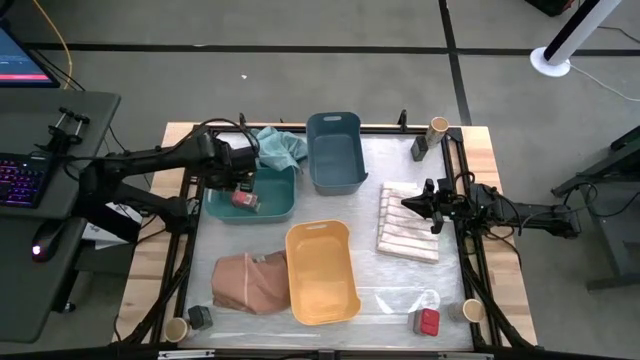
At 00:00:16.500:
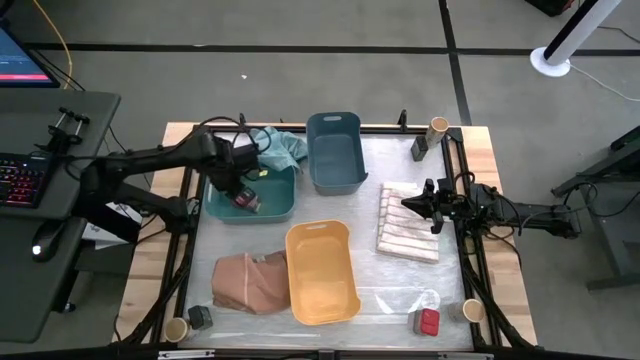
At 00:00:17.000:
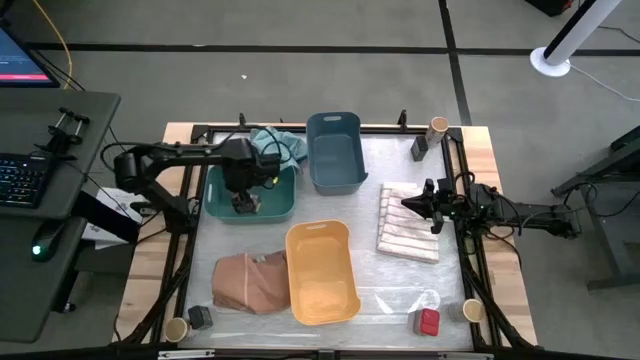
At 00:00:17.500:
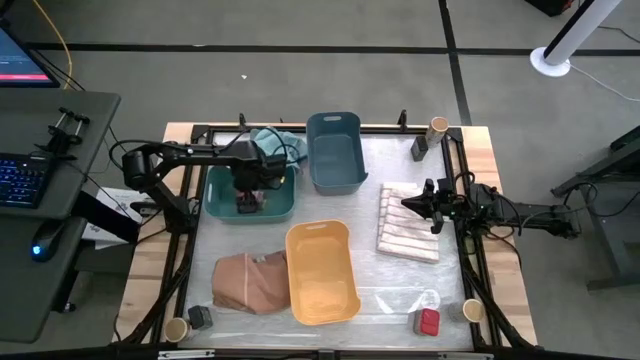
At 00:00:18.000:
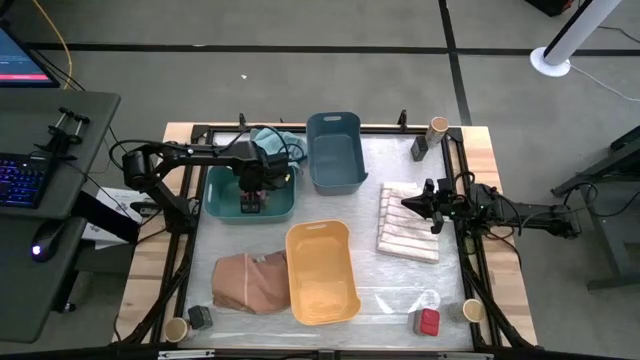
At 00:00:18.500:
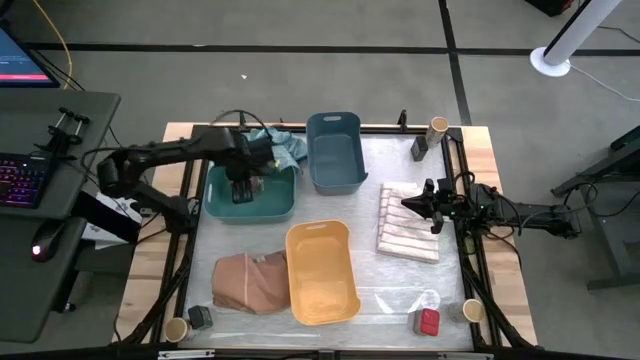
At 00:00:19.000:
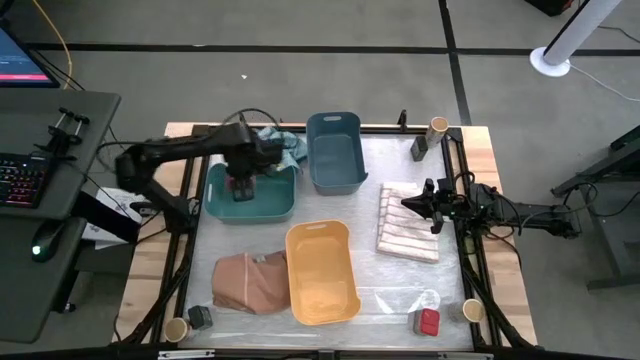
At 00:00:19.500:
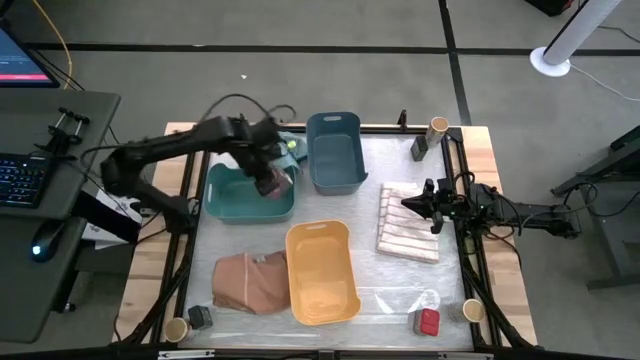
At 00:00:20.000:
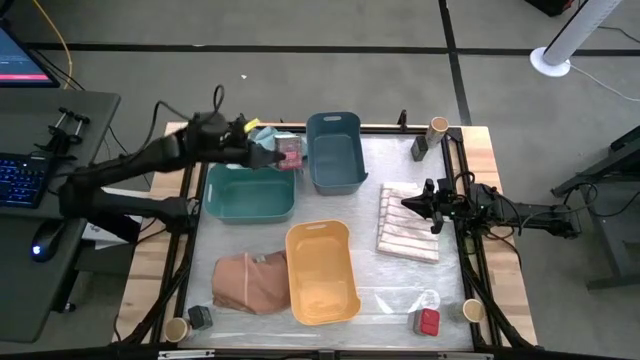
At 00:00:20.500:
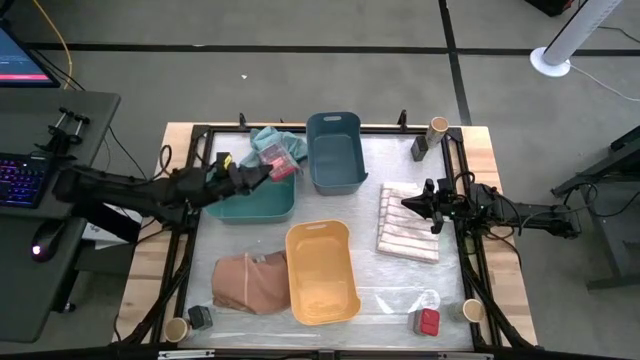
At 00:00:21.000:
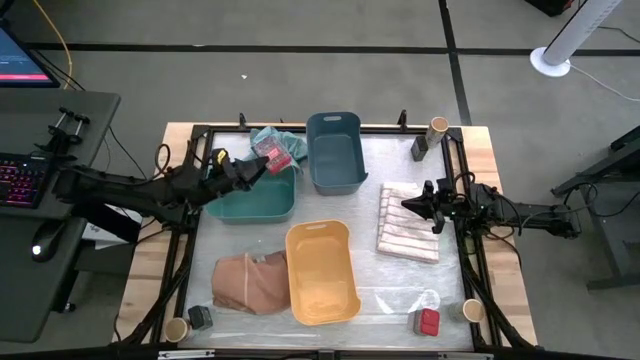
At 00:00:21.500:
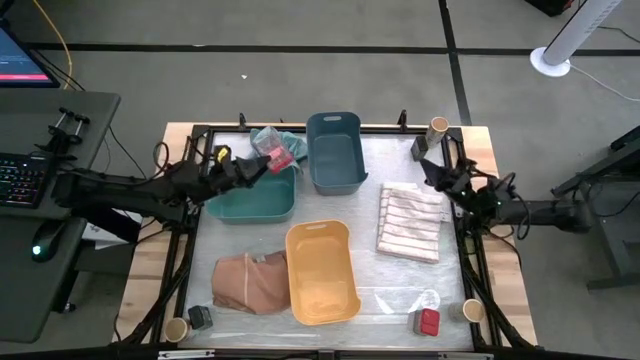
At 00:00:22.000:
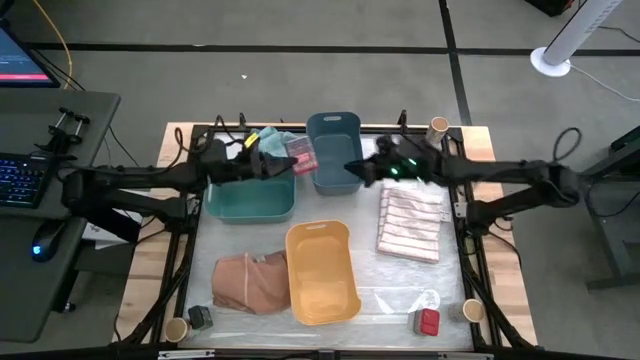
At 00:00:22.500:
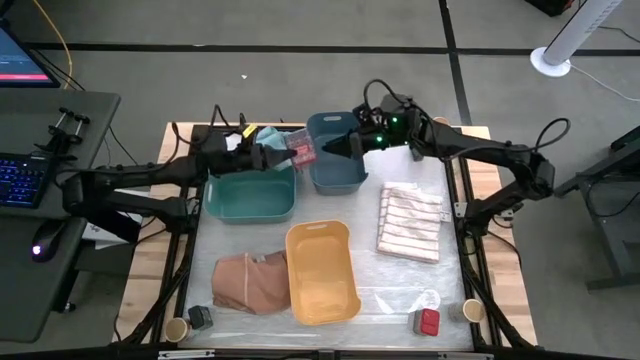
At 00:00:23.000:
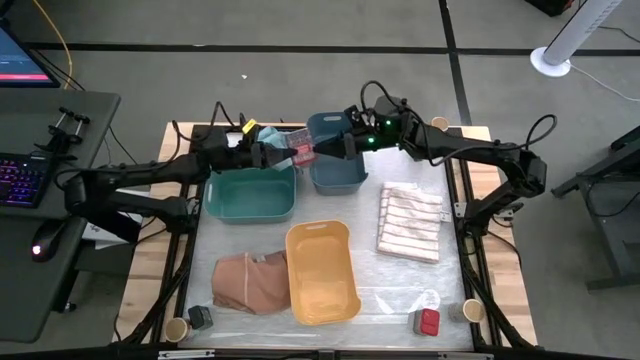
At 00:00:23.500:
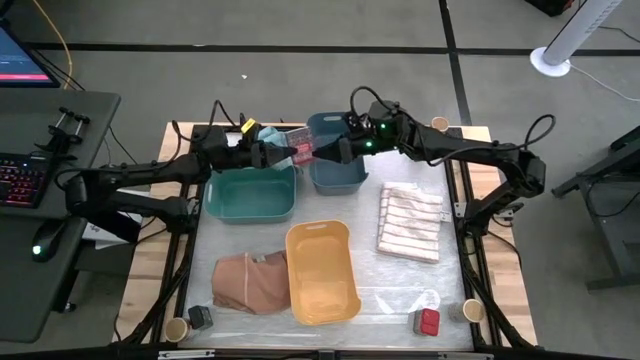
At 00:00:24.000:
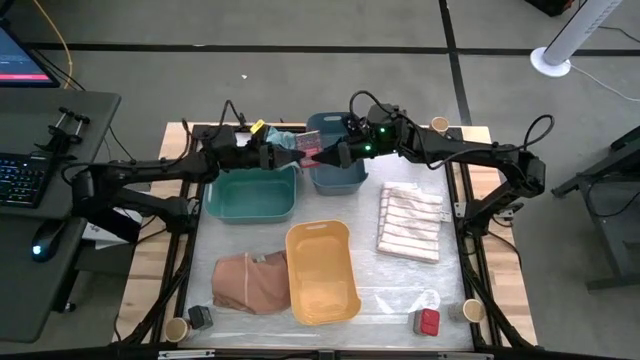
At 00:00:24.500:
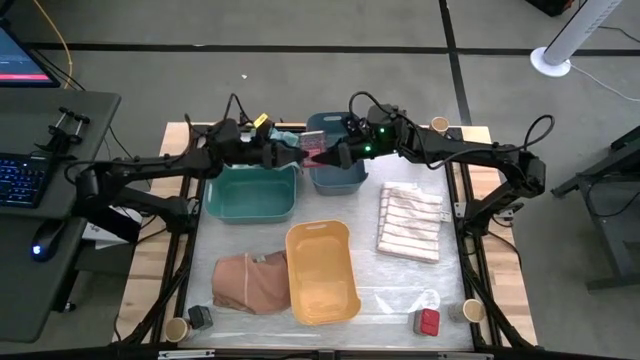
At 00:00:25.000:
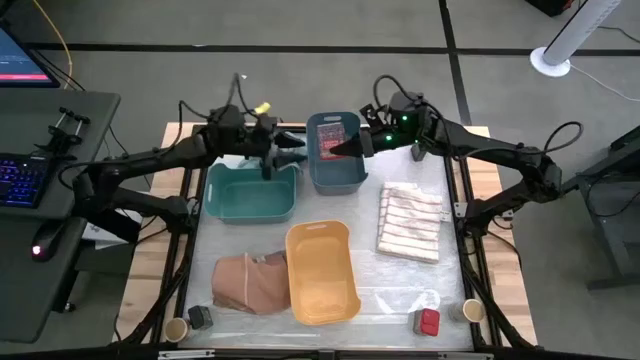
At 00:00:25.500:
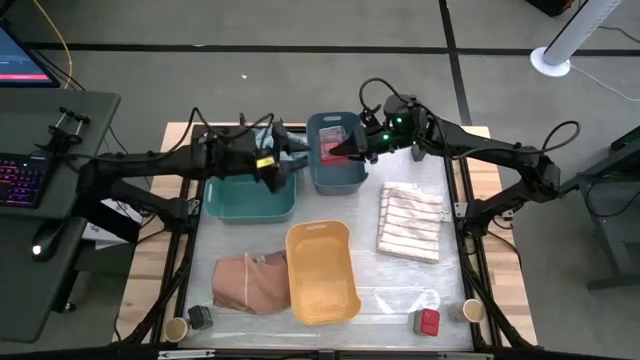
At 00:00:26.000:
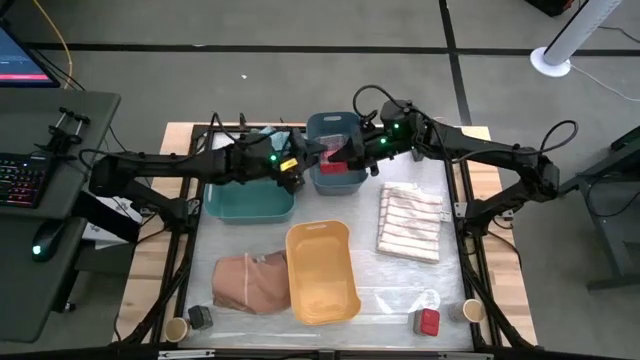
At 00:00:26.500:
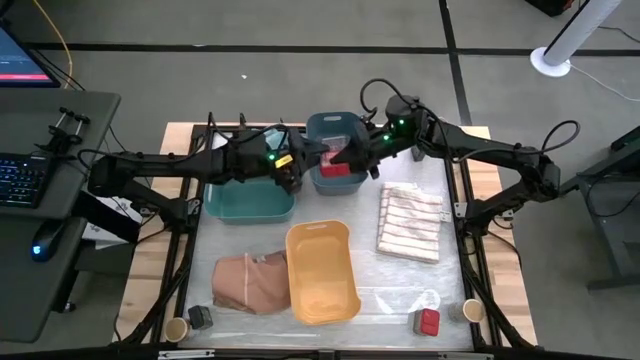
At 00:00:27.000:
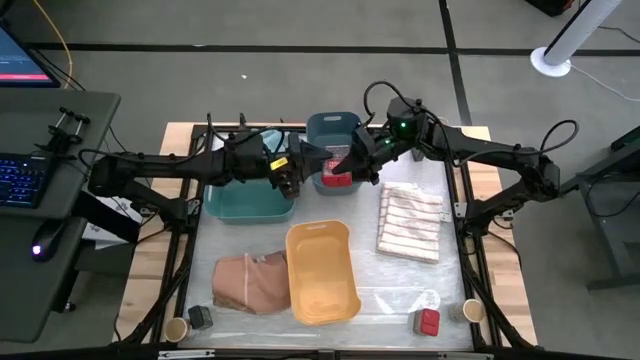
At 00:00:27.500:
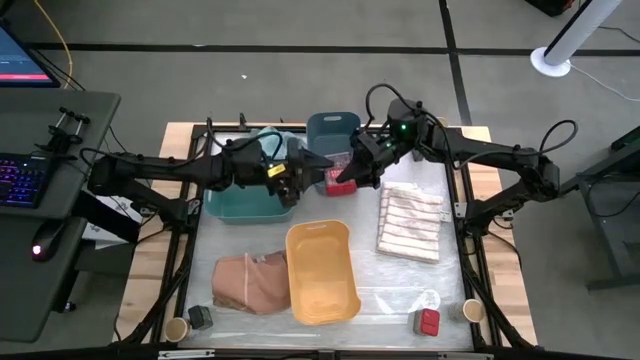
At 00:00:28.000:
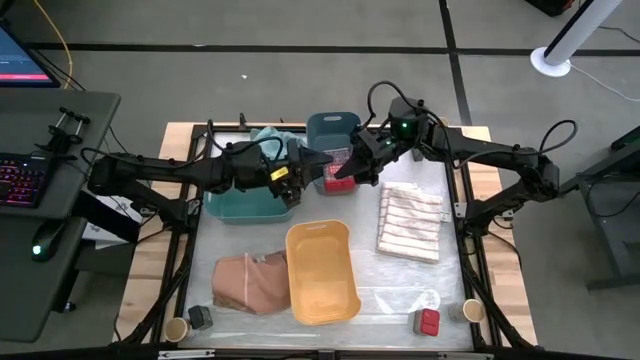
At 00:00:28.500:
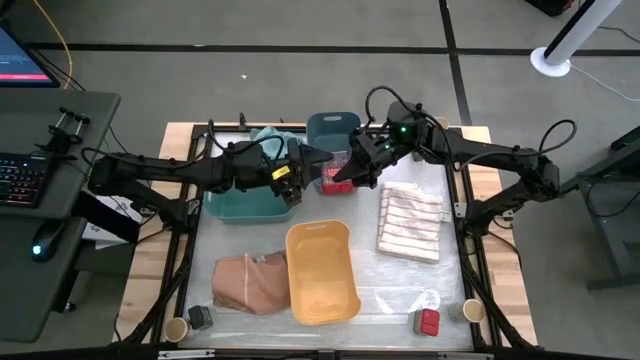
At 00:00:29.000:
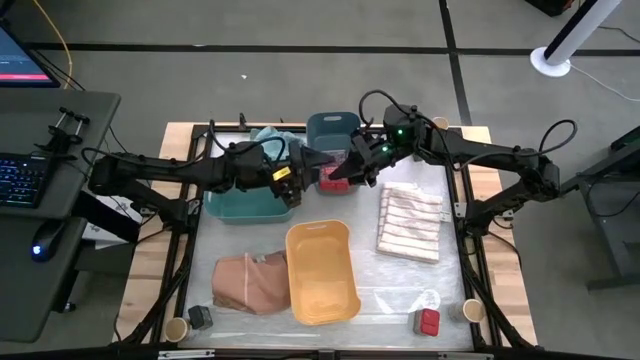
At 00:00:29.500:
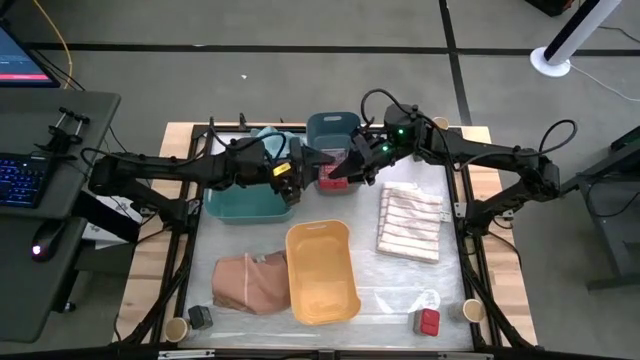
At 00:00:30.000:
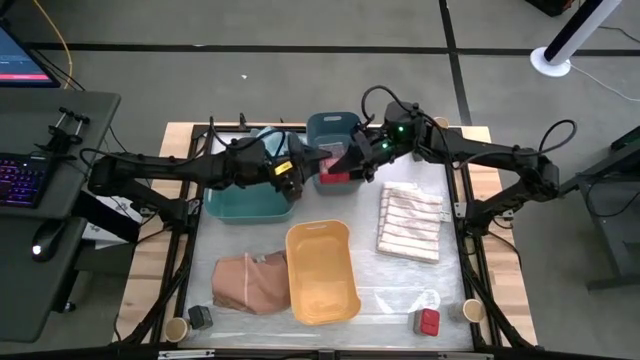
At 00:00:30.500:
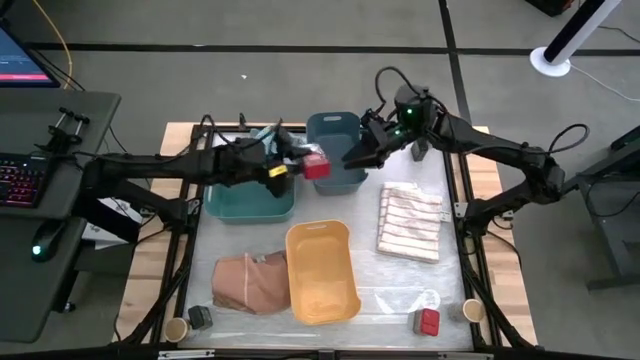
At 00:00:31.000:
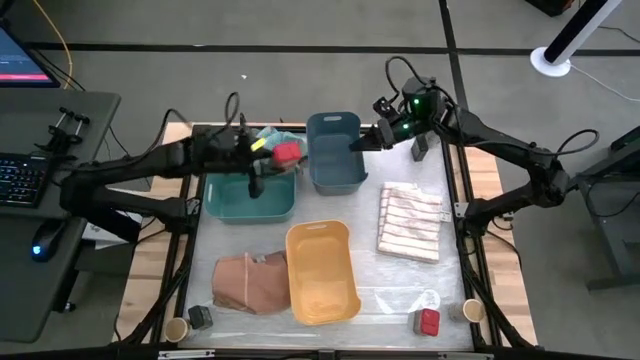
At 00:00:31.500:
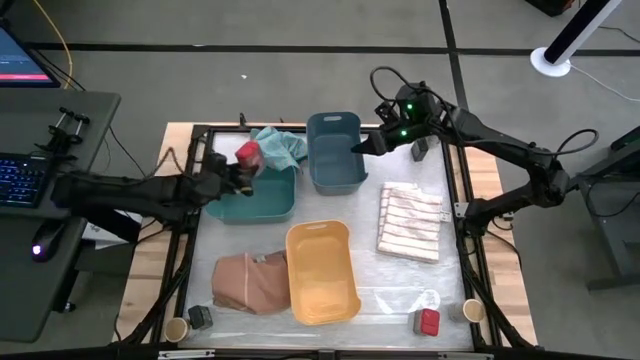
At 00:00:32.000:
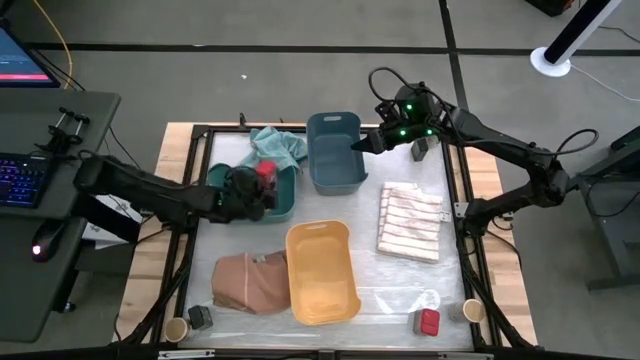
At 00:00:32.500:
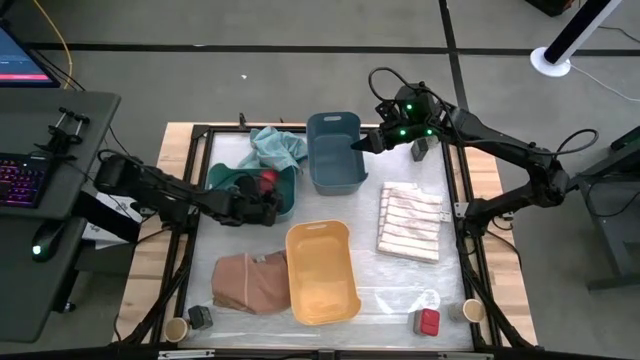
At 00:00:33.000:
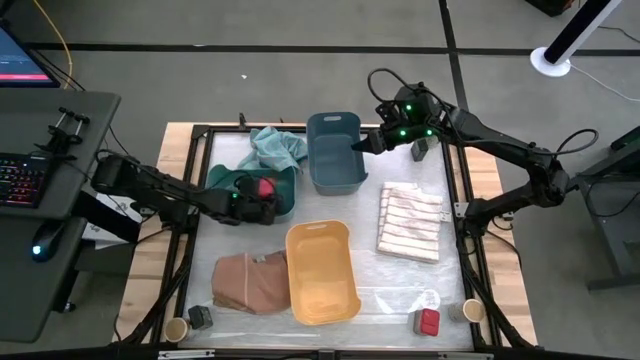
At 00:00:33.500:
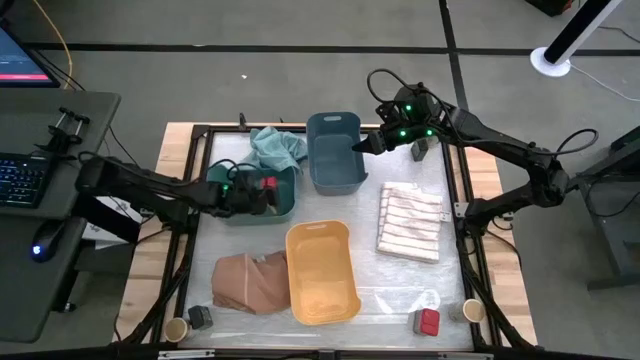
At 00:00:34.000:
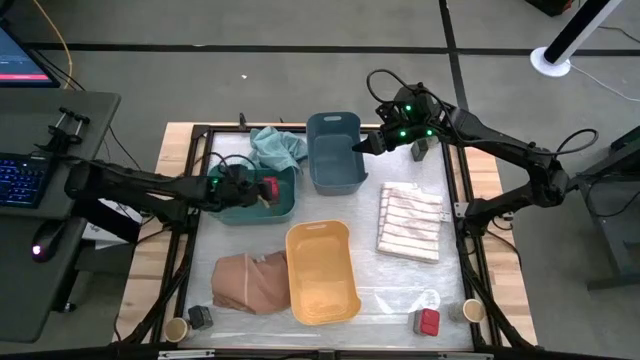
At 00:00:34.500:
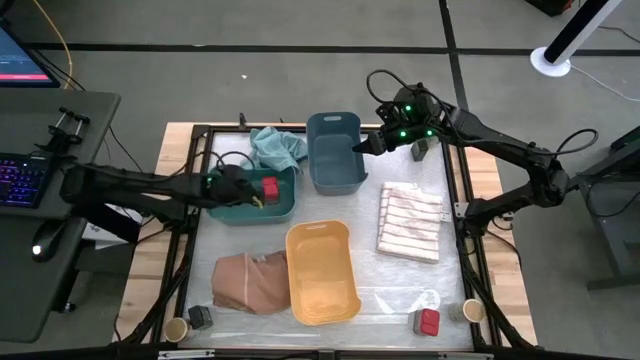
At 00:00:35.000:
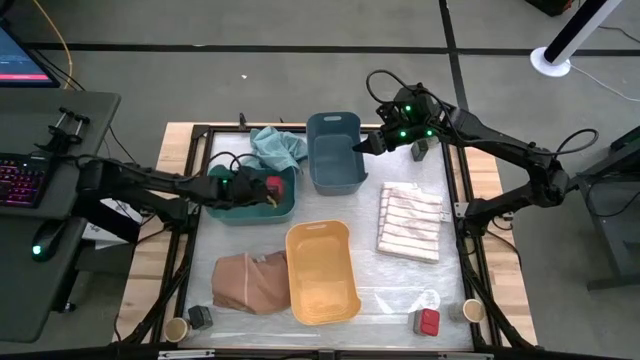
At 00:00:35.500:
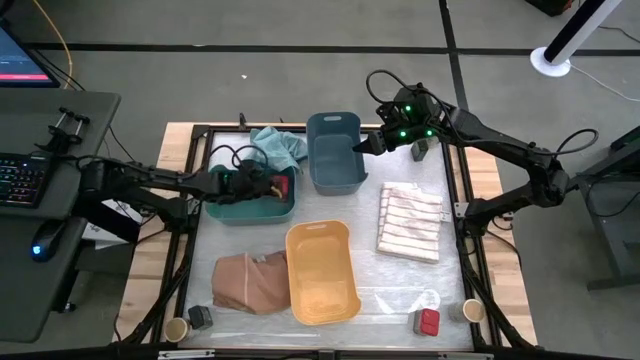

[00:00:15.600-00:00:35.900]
Task: Sort spices by type
Put the top red seasoning can into the green bin

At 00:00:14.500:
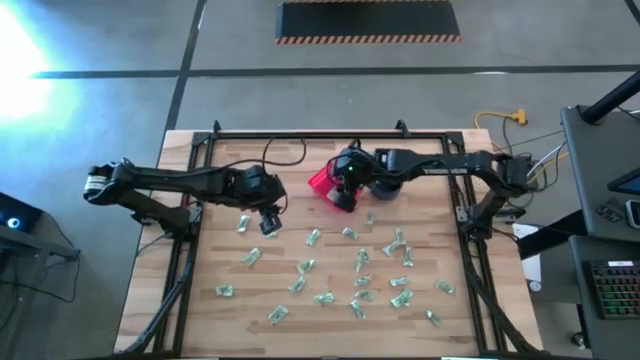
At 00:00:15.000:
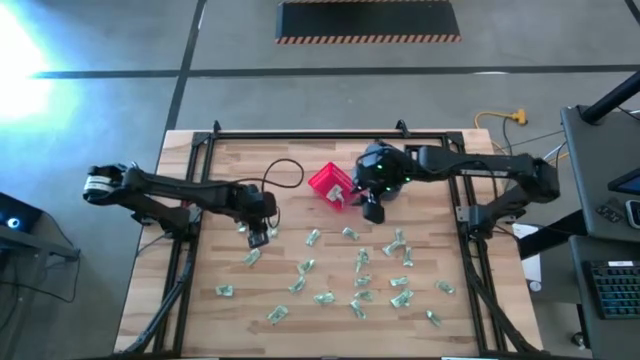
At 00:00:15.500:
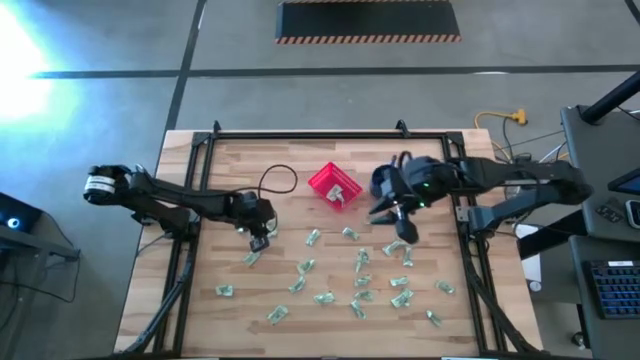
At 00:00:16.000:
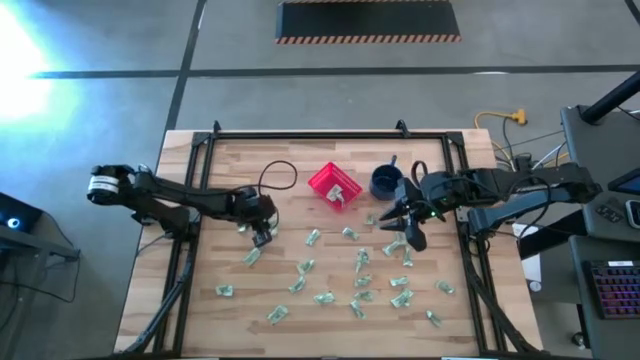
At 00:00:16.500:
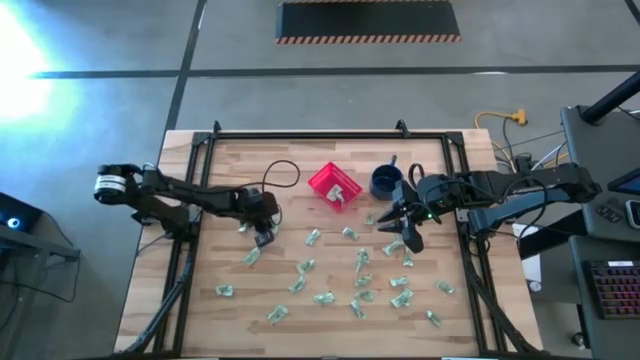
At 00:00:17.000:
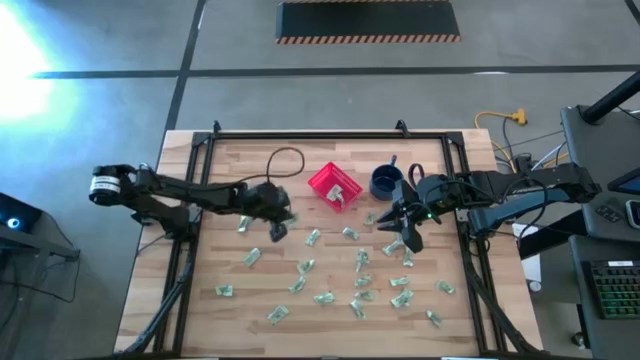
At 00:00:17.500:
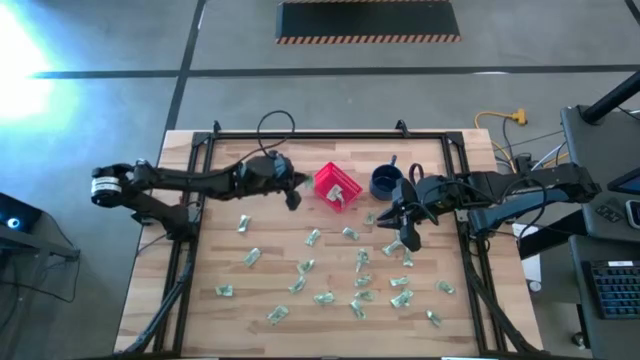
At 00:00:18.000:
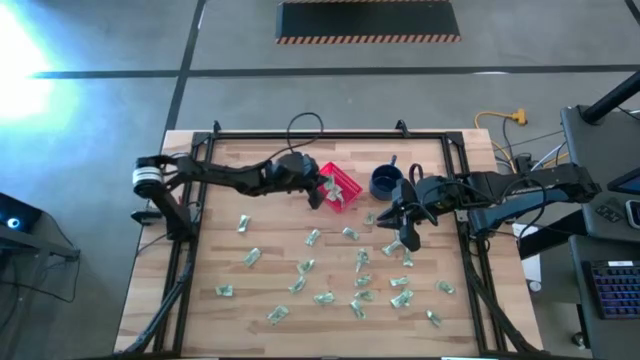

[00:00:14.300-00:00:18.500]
Task: Pick and place Stevia / Truvia into bins
Put the stevia packet into the red basket
